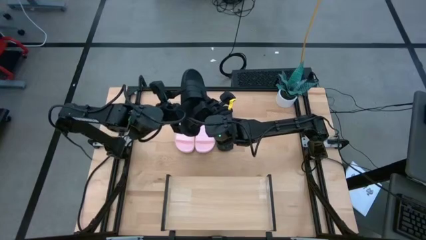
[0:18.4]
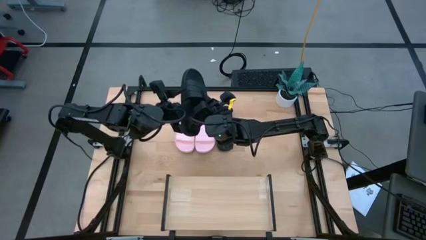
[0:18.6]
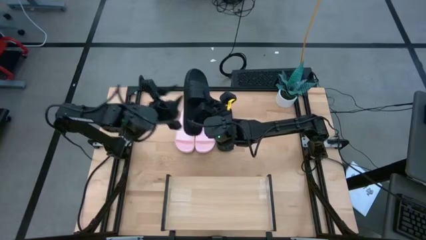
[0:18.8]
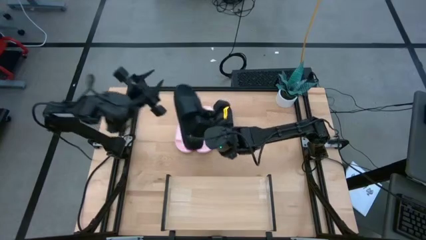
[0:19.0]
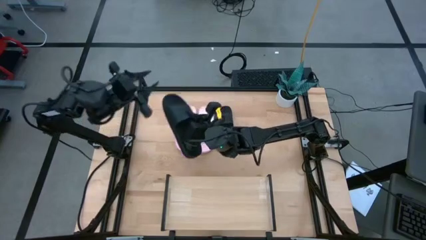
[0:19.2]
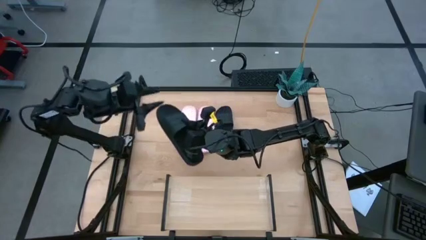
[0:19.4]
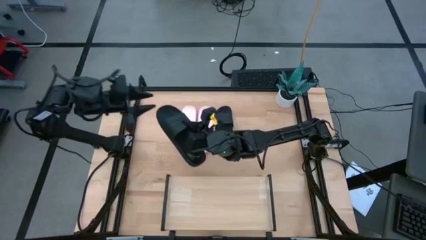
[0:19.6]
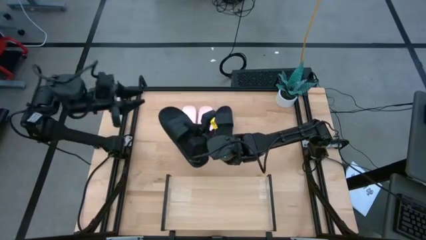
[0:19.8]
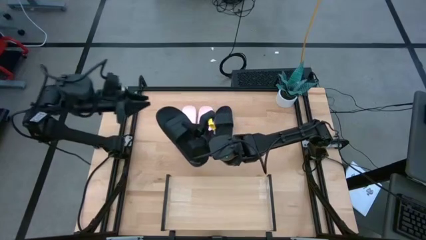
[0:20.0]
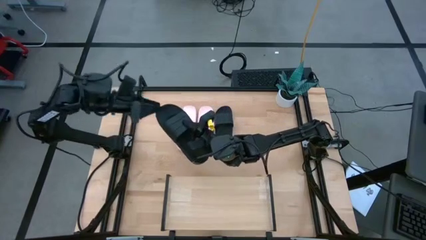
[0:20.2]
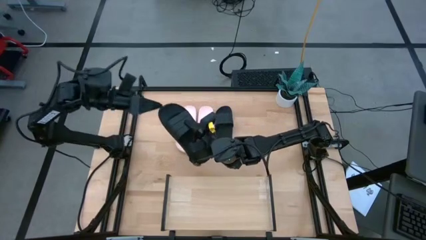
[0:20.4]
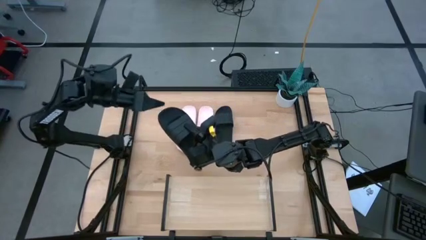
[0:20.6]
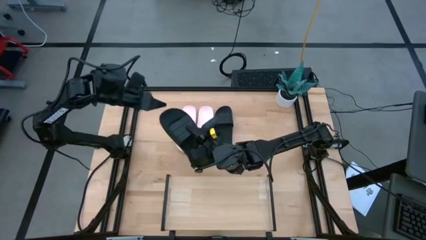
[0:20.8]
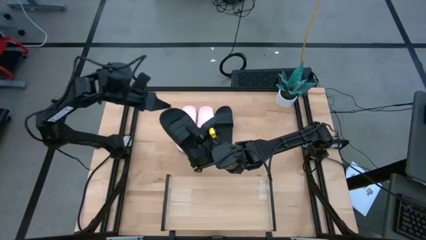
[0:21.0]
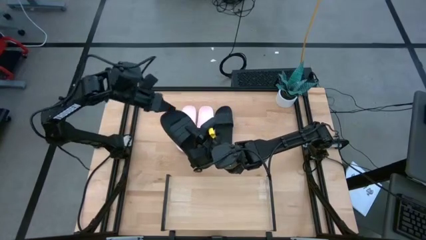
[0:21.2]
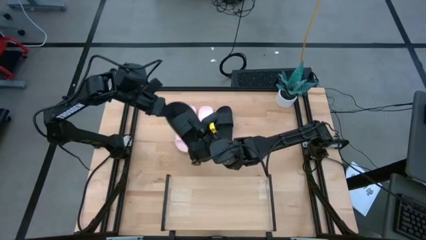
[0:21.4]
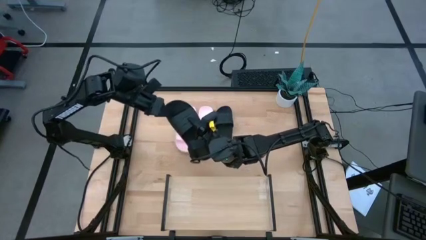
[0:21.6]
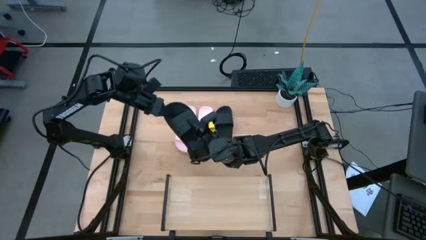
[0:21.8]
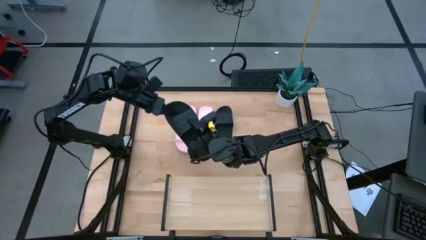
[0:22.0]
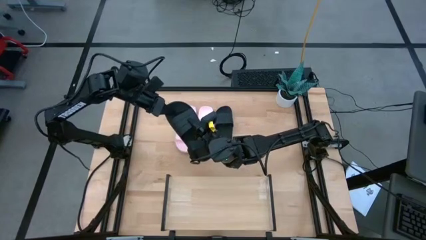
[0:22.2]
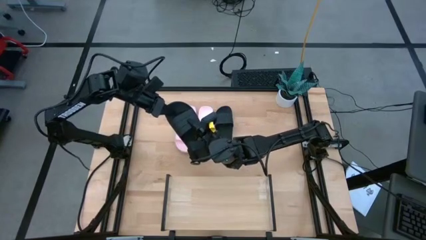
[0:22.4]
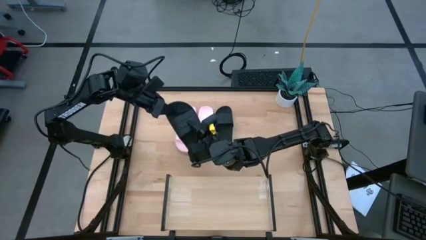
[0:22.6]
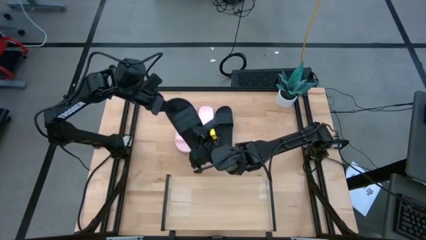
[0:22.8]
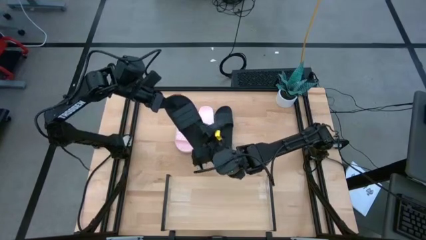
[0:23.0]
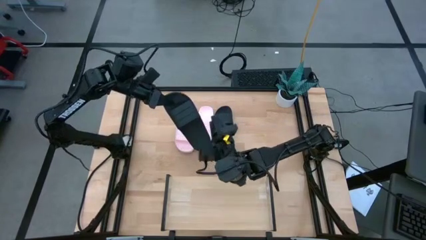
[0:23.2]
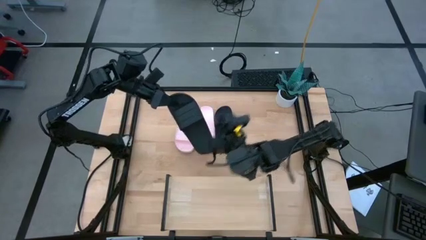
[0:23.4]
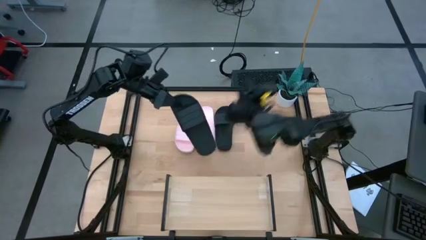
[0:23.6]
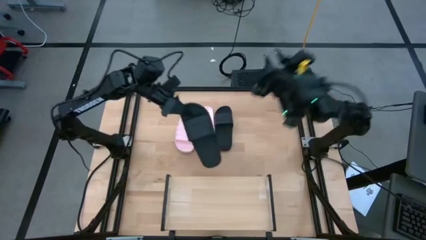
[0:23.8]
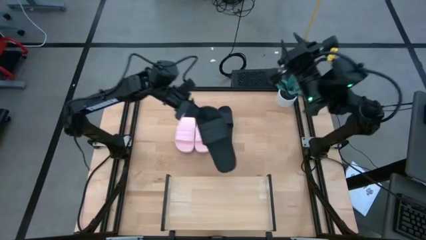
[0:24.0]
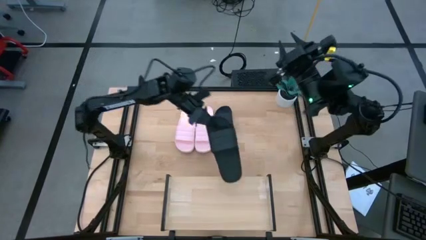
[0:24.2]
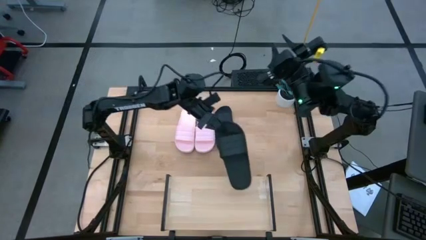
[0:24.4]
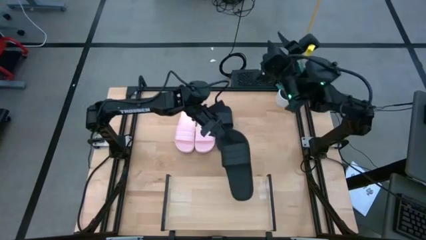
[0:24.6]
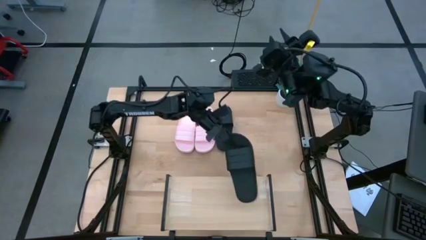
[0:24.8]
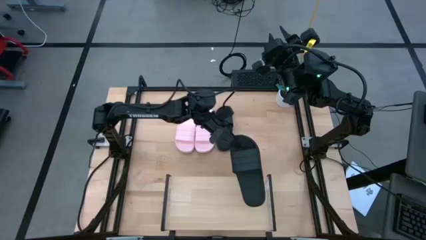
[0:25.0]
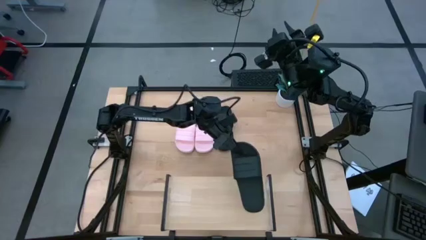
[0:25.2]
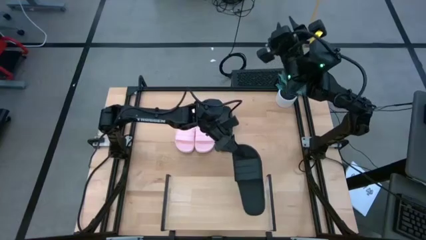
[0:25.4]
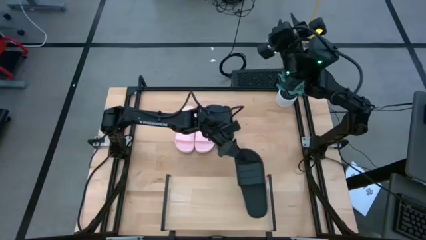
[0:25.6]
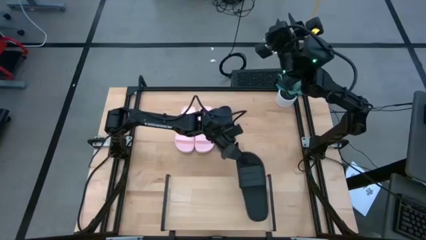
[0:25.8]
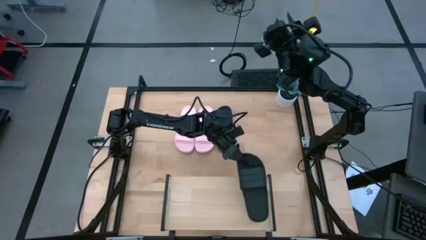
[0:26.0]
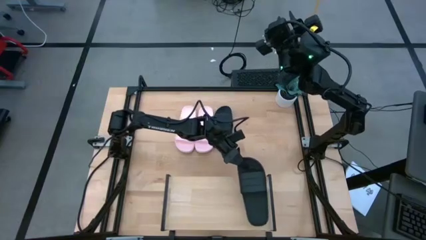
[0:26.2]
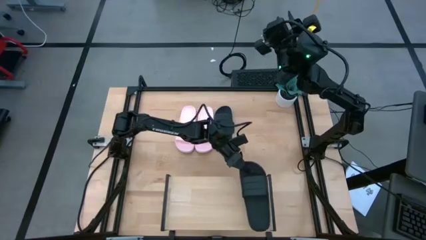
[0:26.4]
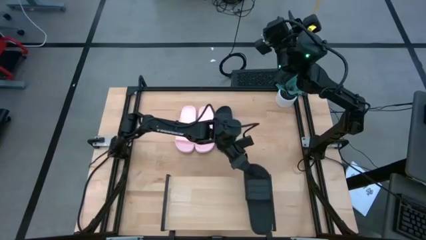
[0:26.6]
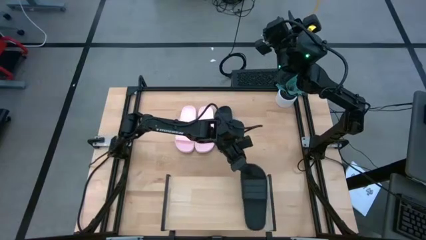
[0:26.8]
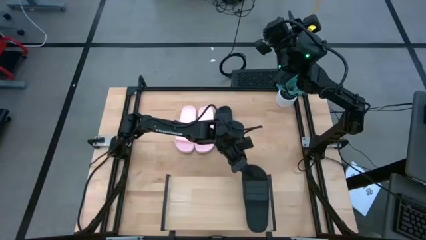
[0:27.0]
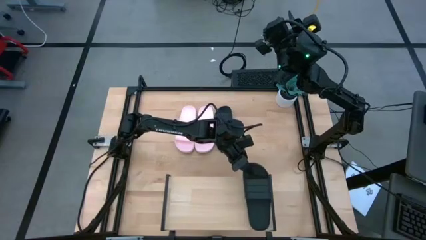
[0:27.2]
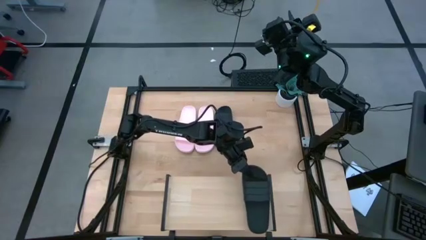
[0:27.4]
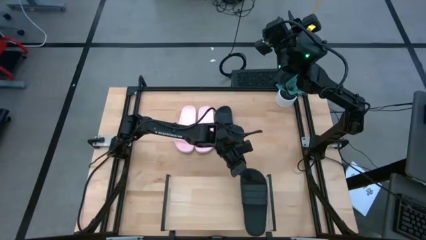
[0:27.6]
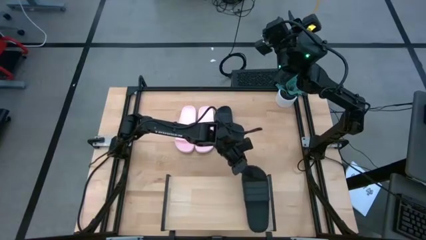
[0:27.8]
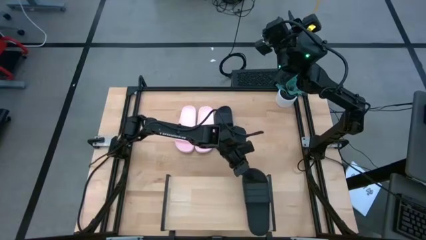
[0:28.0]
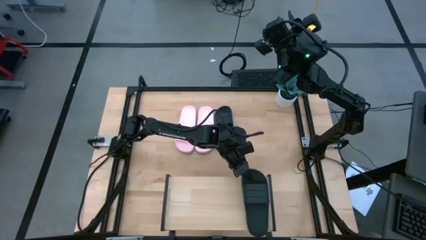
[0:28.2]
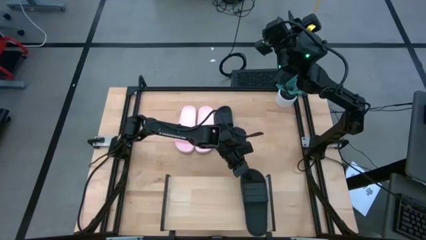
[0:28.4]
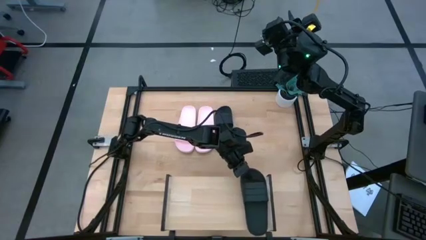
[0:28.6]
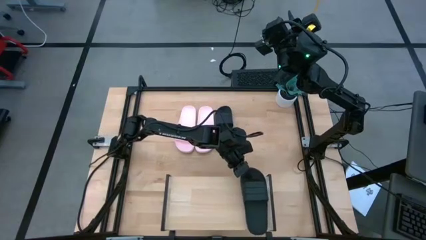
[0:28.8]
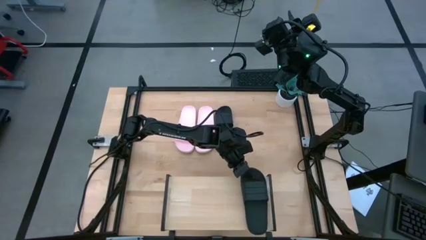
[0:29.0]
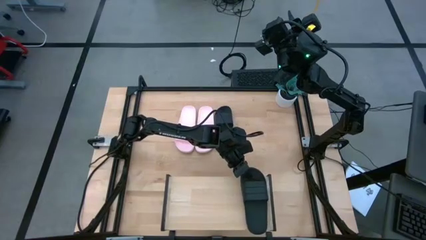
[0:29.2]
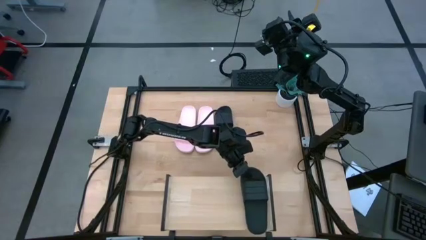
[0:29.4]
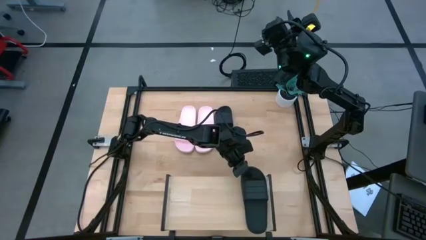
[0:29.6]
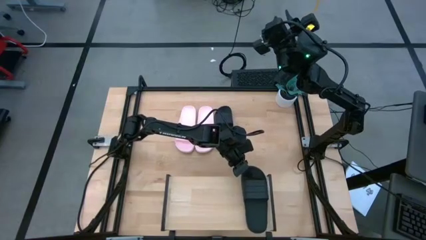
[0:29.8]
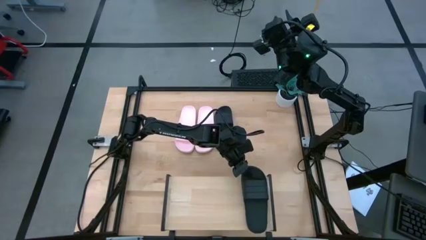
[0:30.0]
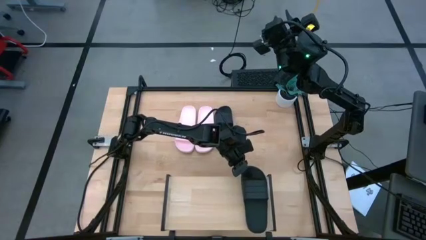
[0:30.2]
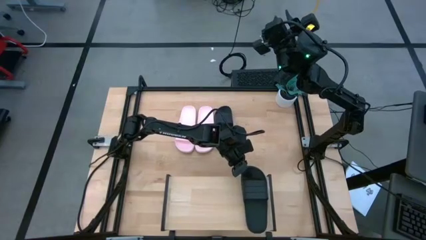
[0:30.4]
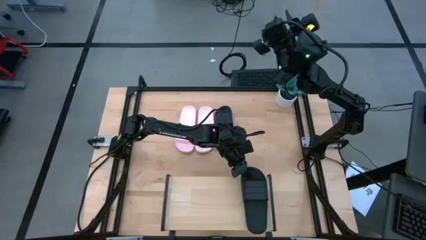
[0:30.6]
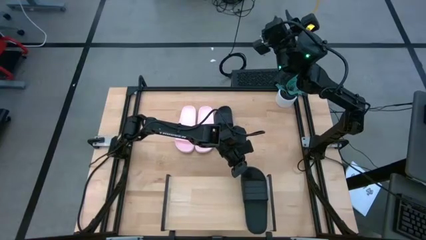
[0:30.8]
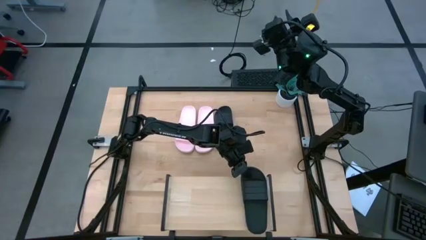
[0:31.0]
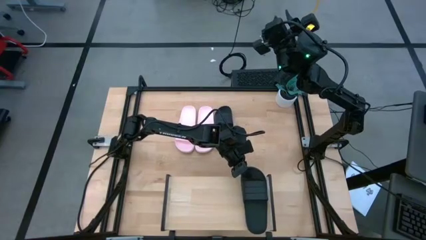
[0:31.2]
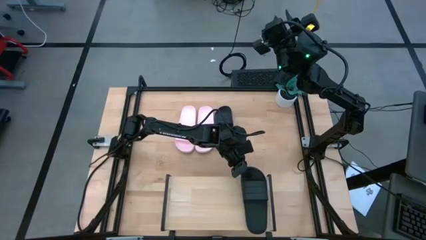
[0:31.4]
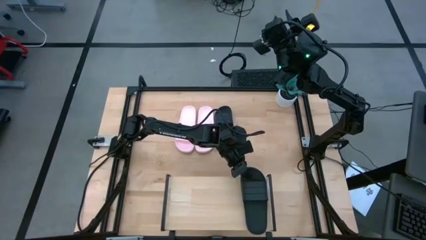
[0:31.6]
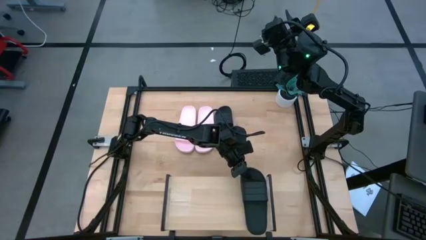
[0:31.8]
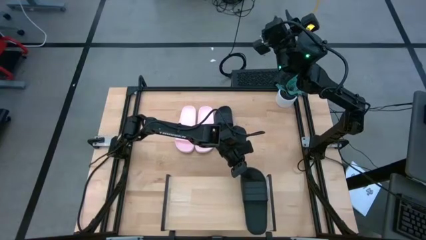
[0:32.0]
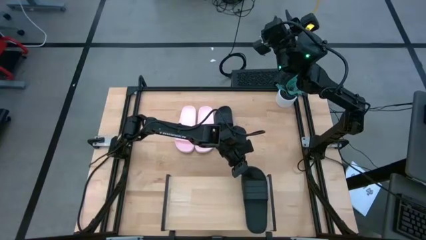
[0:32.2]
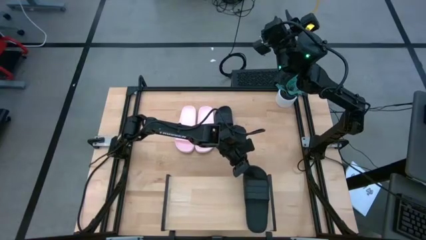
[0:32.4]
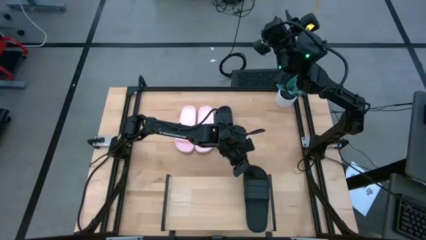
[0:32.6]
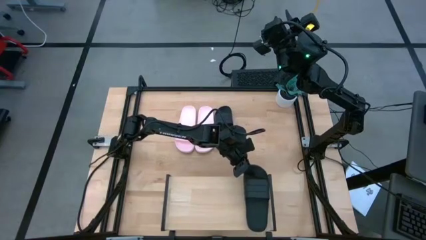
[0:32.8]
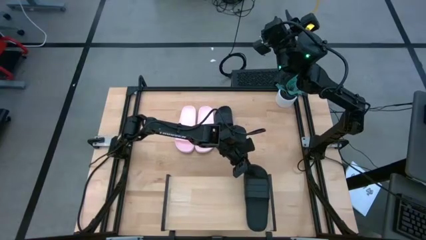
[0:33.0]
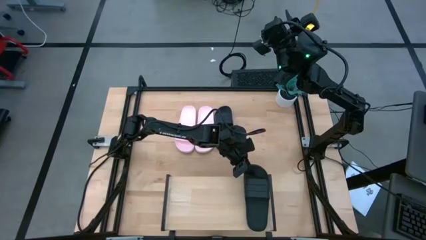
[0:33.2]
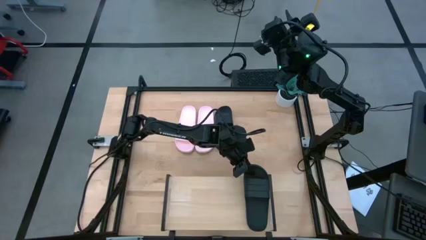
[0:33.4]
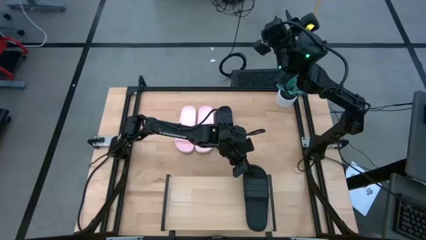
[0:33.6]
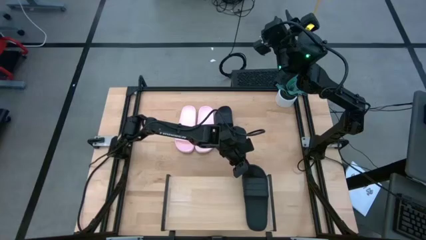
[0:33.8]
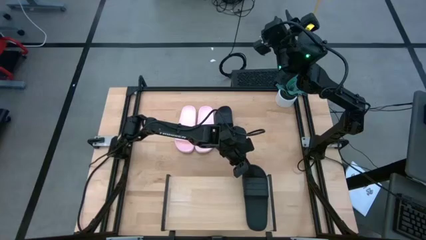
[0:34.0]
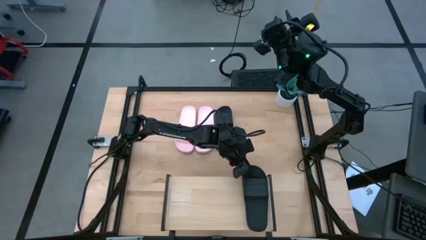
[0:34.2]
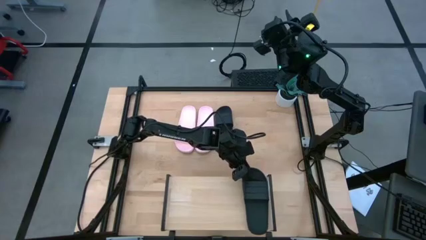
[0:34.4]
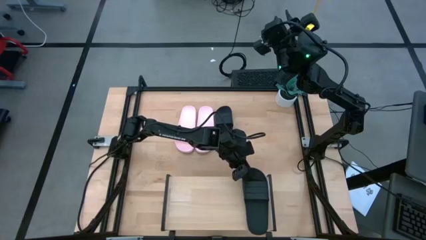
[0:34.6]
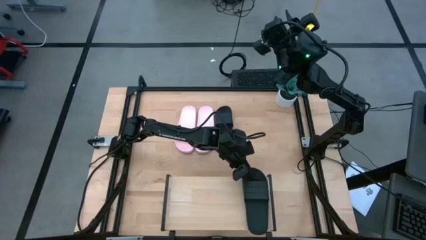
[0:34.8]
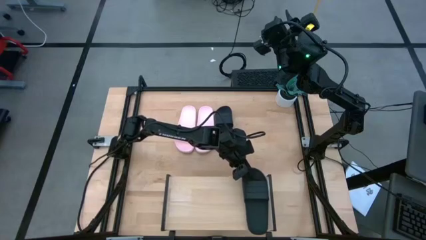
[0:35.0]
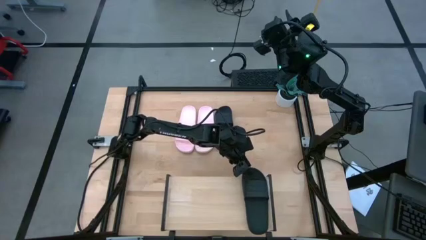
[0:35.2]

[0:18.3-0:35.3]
Task: Pick and place slides into the shelf
Put the right black slipper on the shelf
